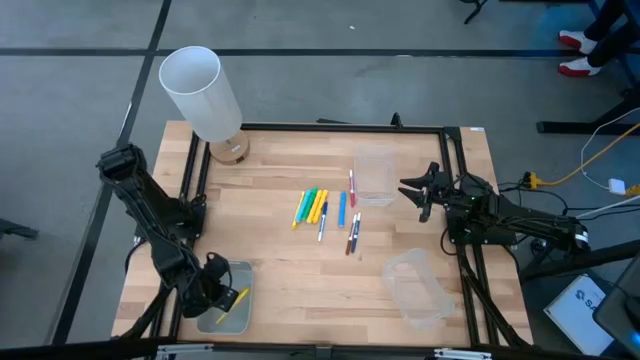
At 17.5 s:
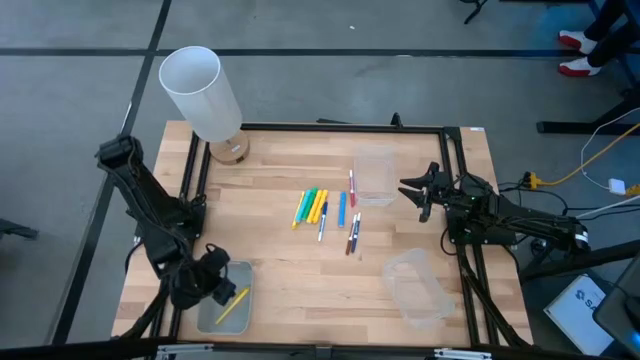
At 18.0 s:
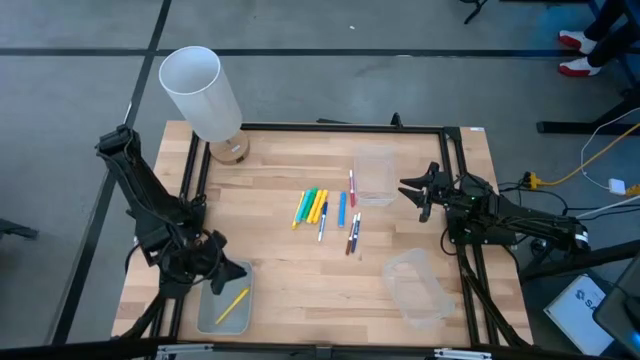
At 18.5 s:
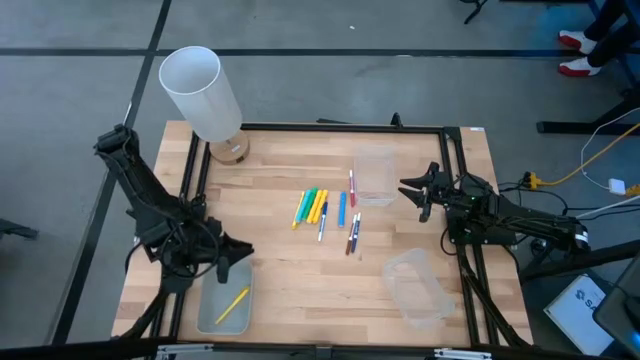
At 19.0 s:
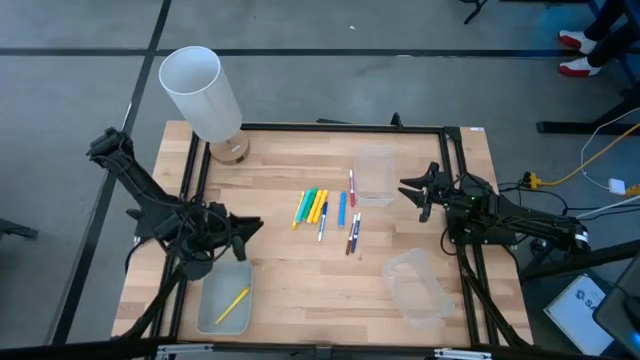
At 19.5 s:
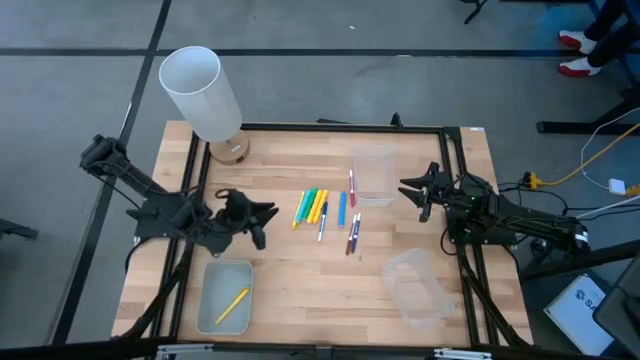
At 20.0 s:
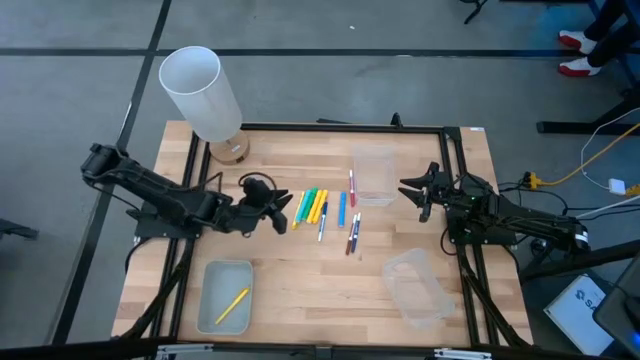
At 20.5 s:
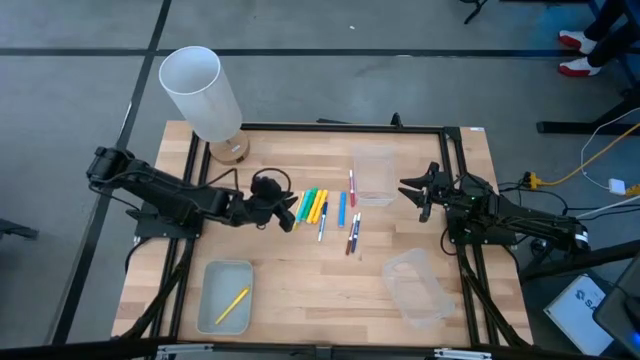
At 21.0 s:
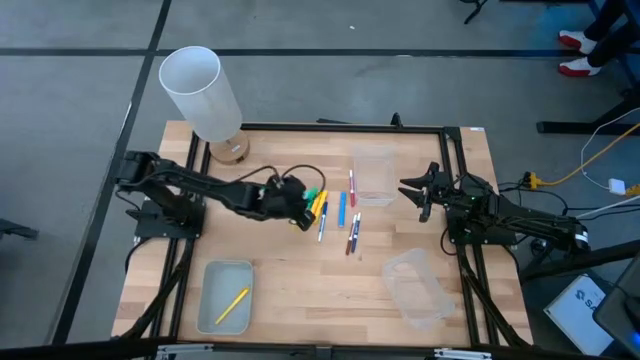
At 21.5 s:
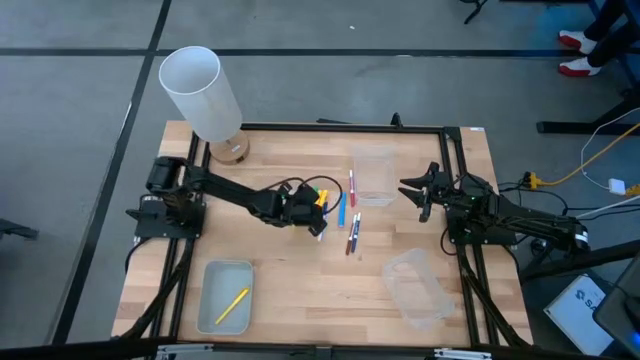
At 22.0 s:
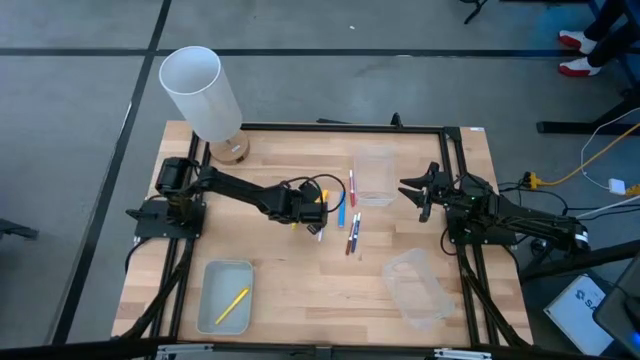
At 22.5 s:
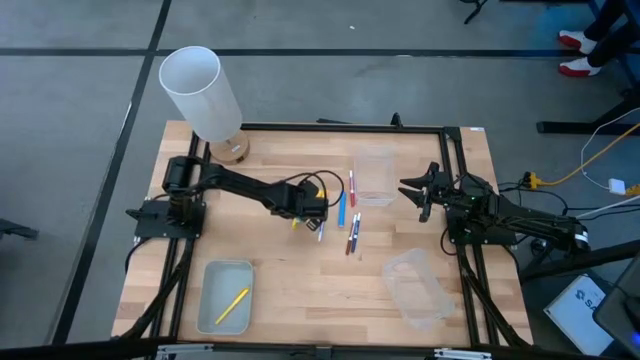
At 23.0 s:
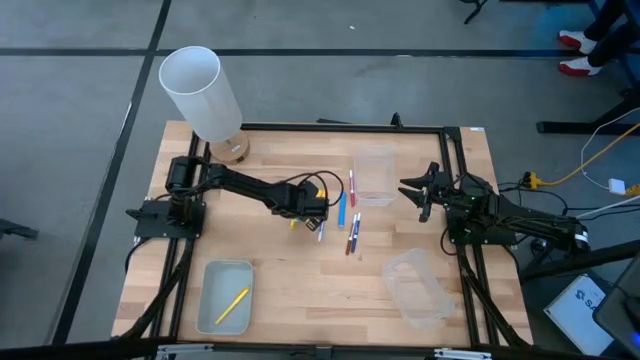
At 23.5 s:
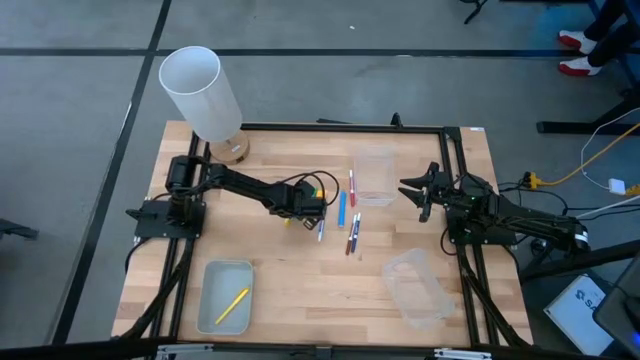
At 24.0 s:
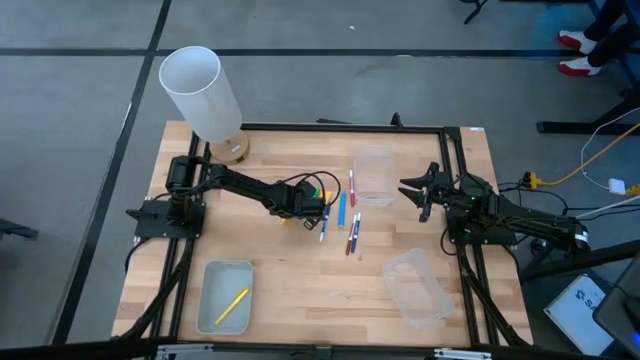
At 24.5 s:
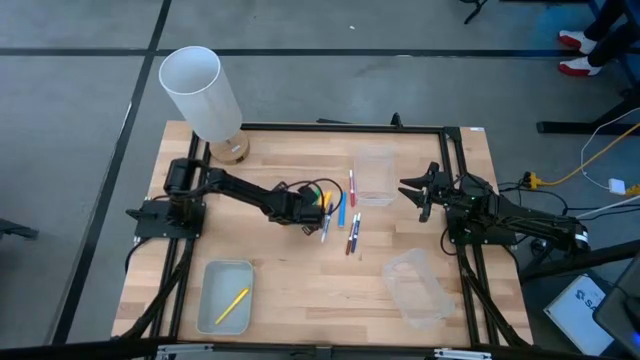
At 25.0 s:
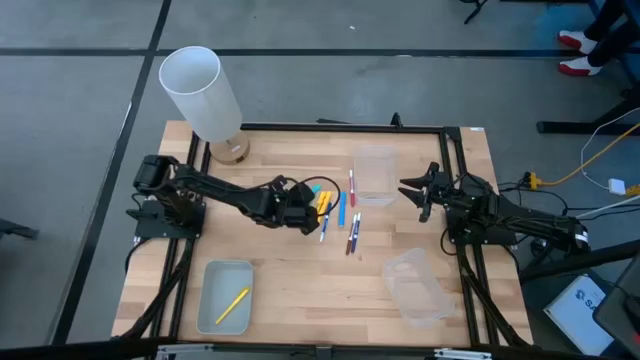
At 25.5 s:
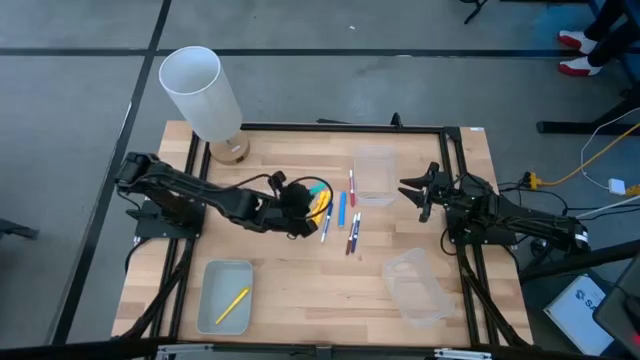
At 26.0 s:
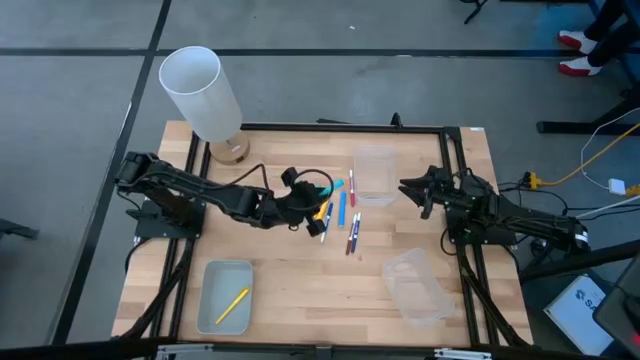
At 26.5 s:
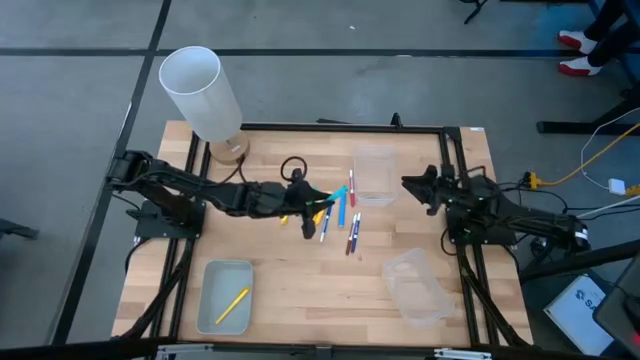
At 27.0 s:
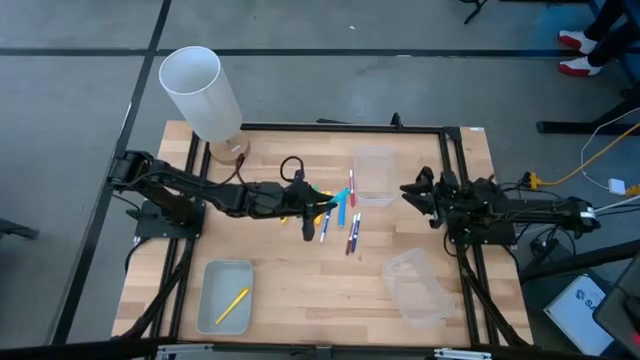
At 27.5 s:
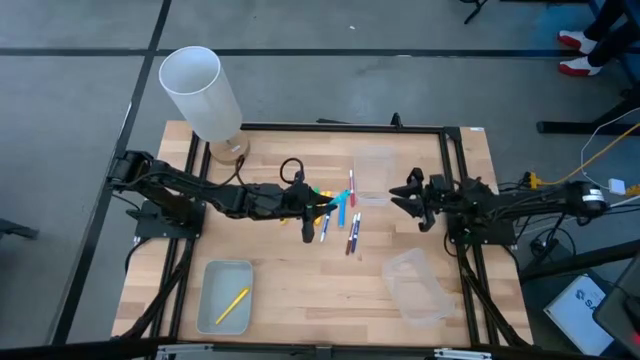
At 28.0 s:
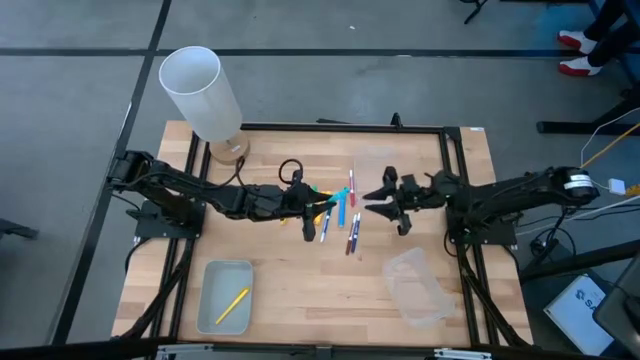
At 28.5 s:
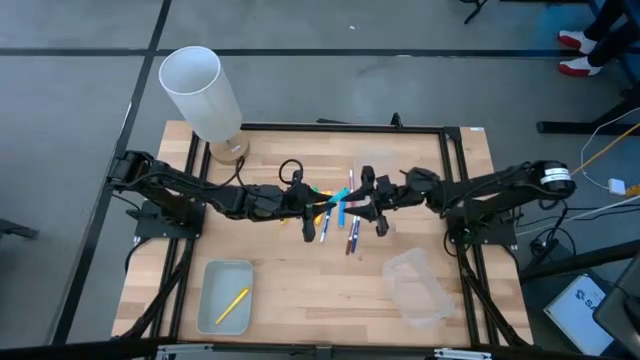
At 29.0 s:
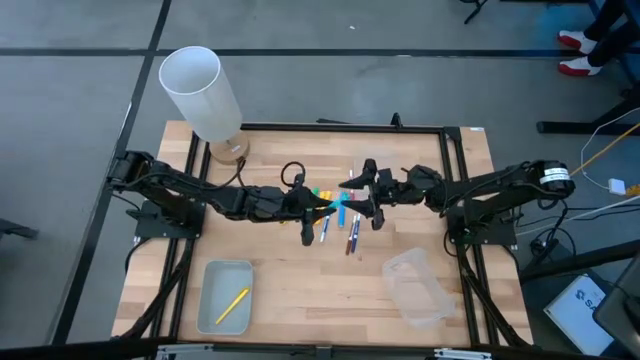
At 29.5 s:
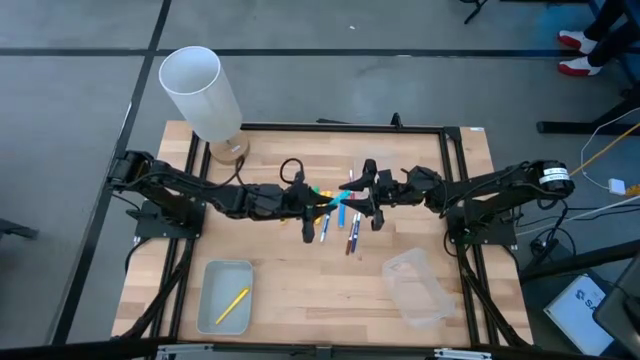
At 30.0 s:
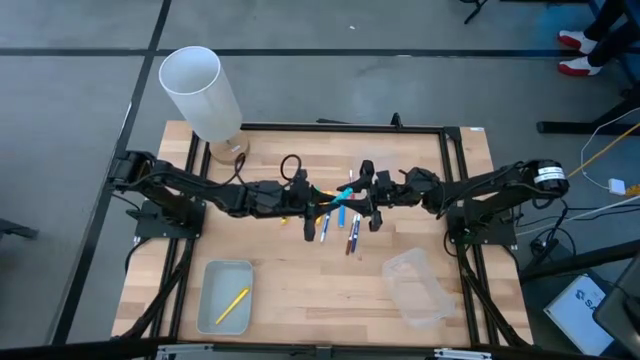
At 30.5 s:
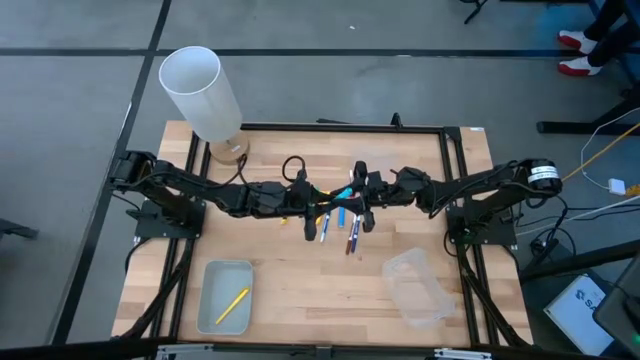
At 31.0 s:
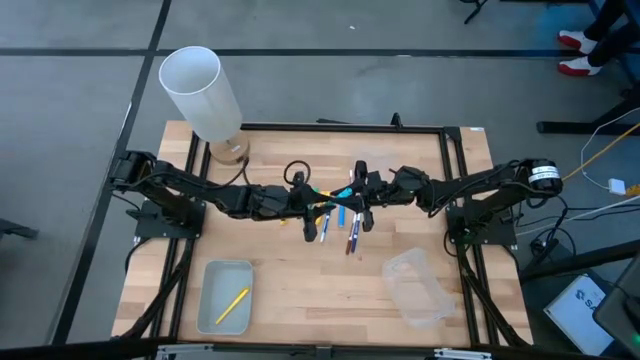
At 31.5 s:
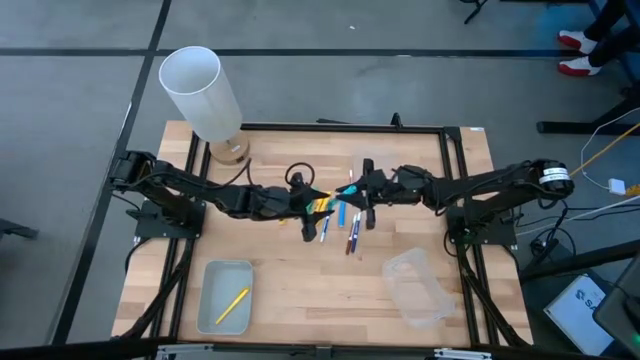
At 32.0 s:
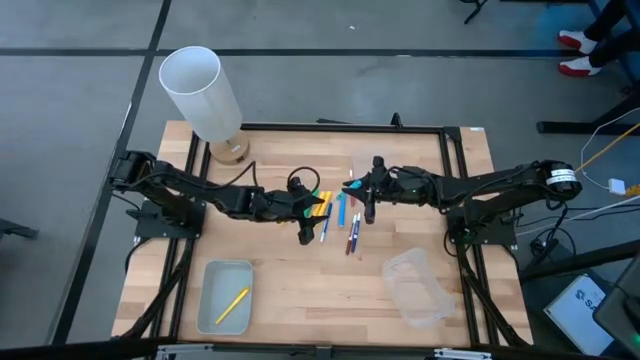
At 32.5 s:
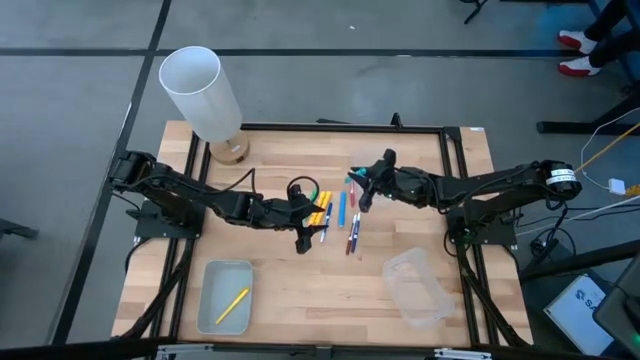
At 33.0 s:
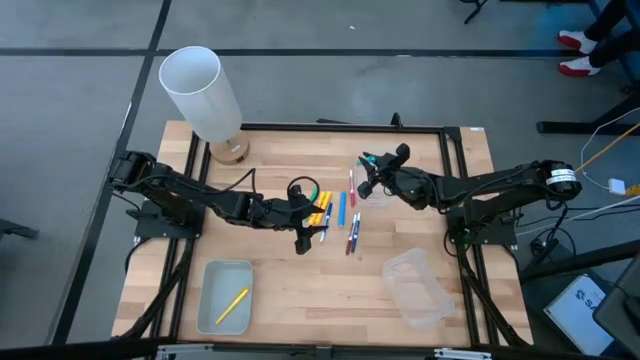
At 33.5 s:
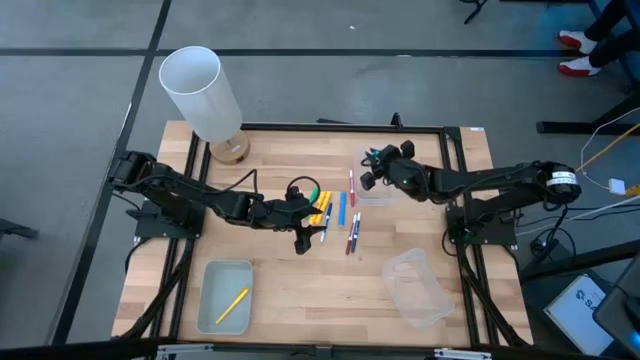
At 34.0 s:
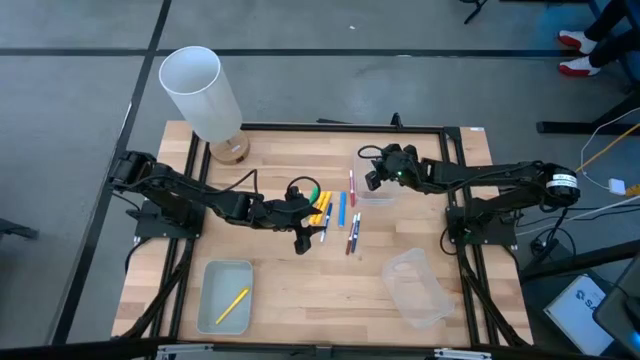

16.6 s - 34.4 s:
Task: Pick & Place Markers
Put the light blue highlighter pen into the top transparent bin

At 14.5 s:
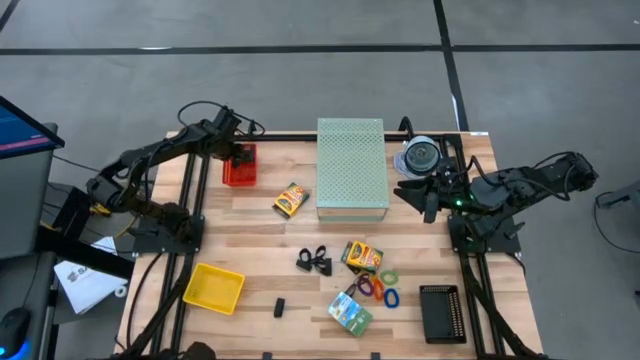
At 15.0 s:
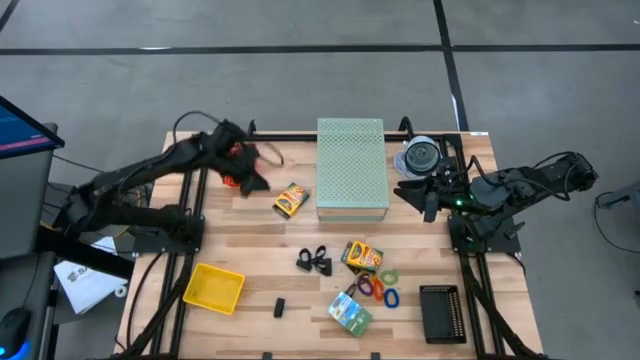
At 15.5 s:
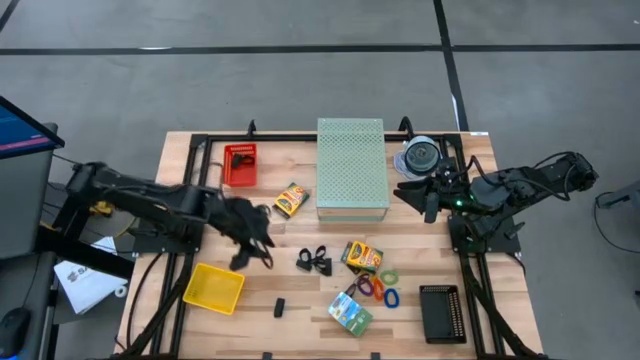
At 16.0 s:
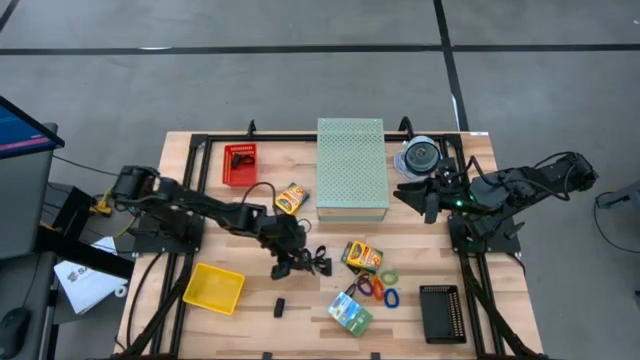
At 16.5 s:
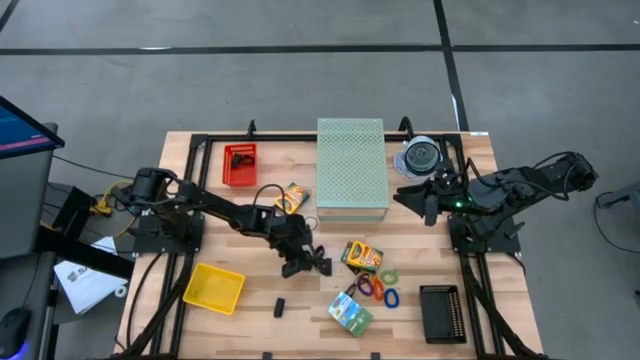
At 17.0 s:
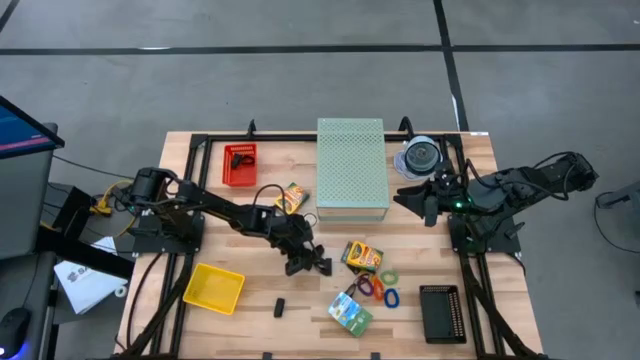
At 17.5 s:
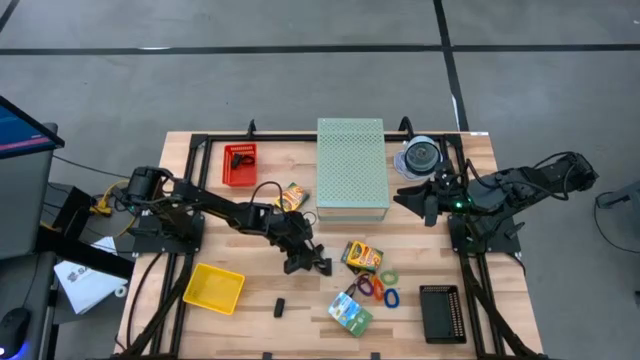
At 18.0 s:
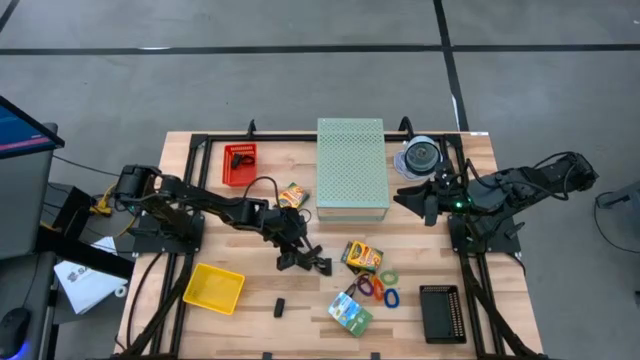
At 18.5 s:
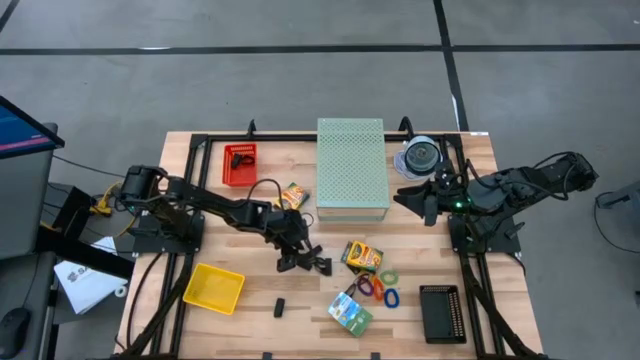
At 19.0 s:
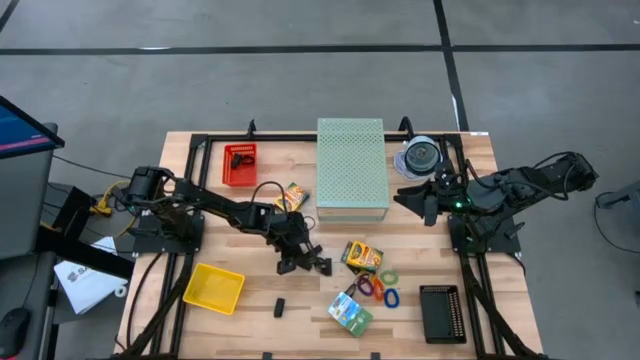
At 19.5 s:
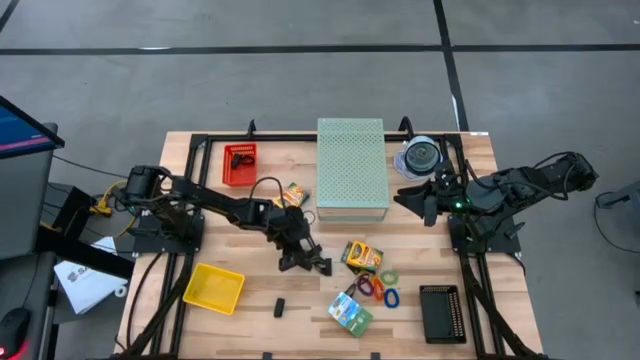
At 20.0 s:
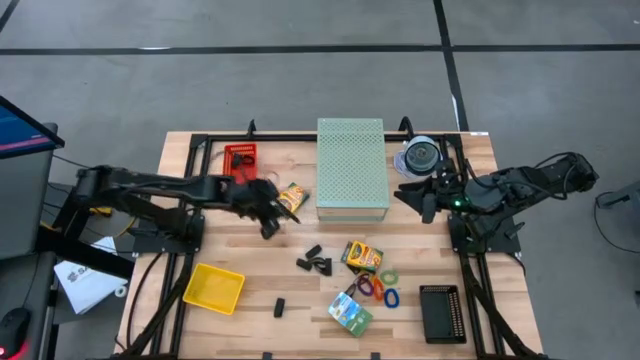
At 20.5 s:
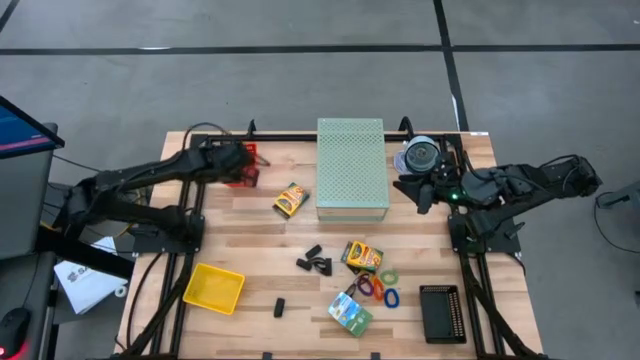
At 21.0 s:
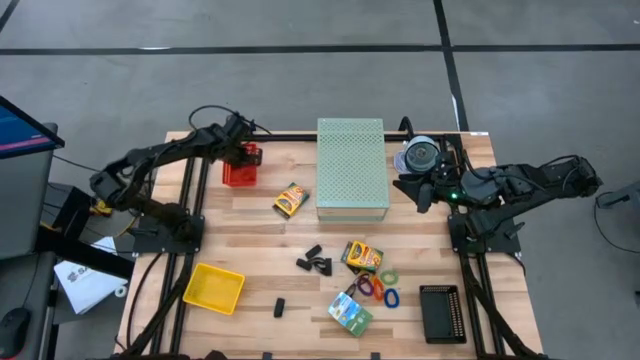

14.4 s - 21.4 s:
Task: Pick & Place Office Desk Supplies
Put the black rubber band into the red bin
